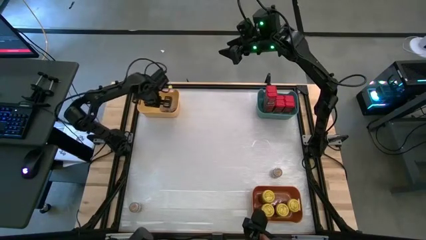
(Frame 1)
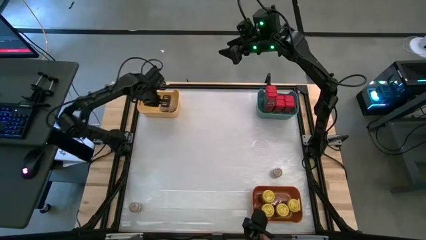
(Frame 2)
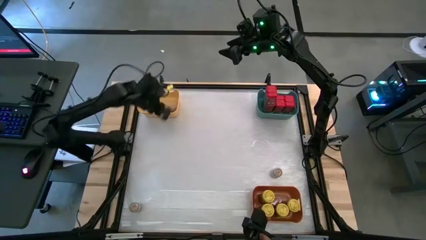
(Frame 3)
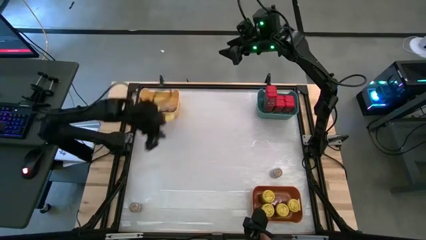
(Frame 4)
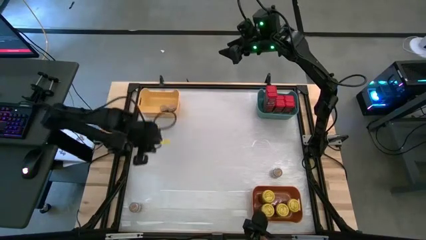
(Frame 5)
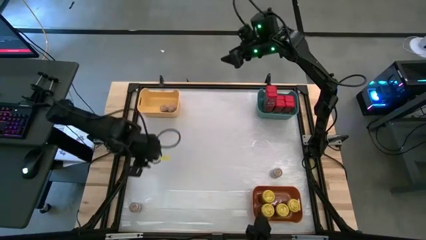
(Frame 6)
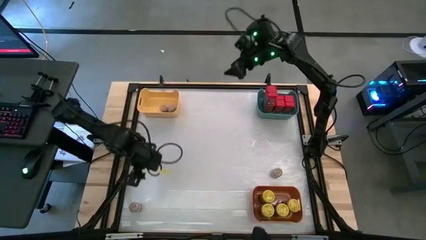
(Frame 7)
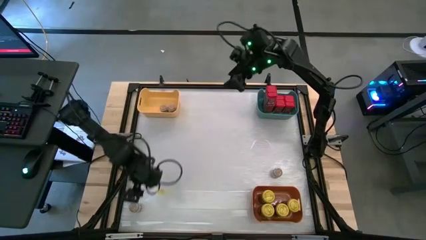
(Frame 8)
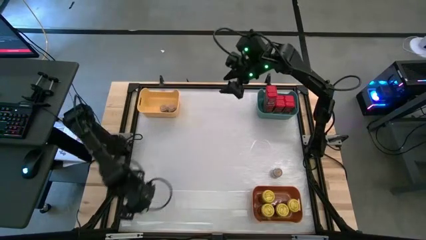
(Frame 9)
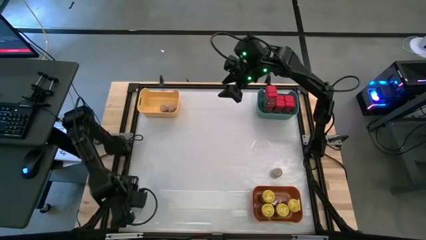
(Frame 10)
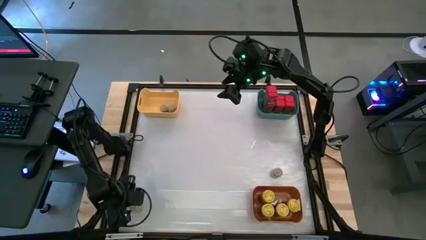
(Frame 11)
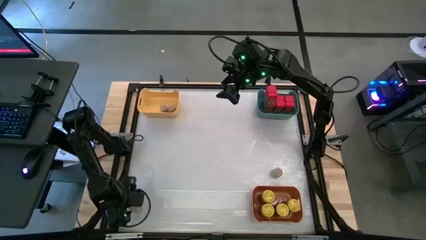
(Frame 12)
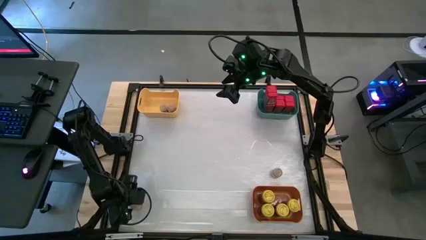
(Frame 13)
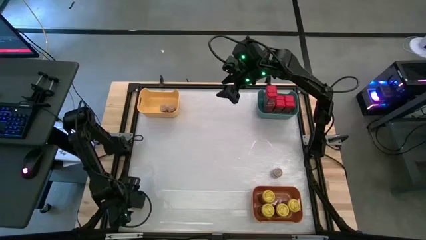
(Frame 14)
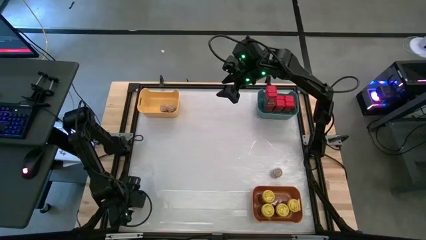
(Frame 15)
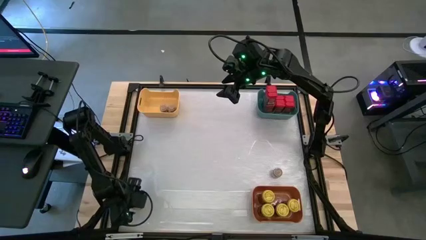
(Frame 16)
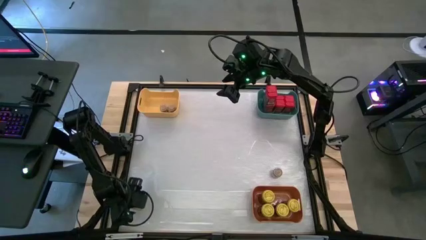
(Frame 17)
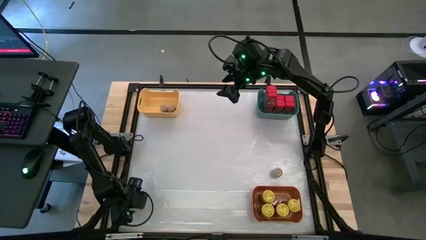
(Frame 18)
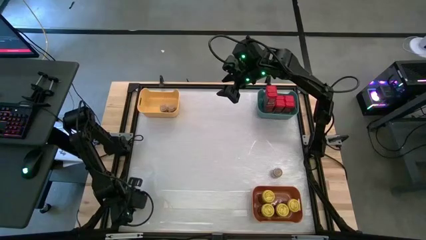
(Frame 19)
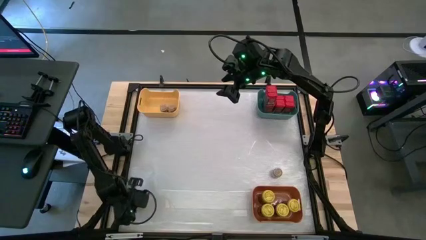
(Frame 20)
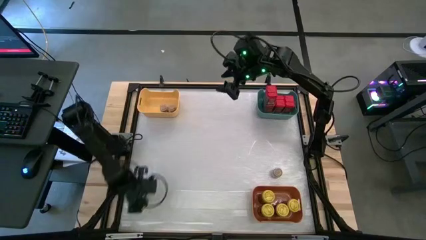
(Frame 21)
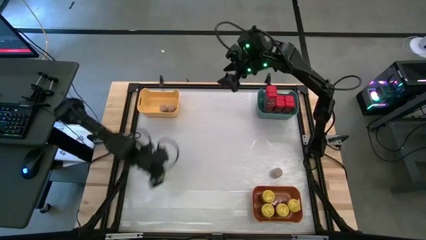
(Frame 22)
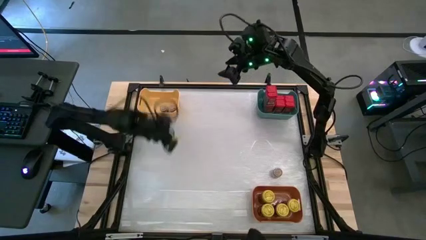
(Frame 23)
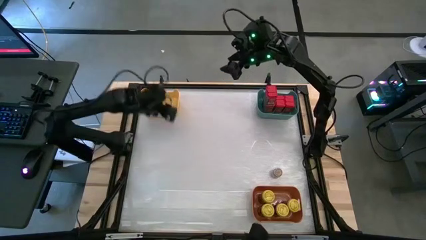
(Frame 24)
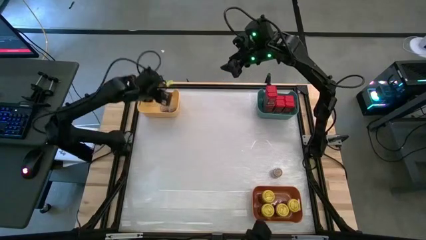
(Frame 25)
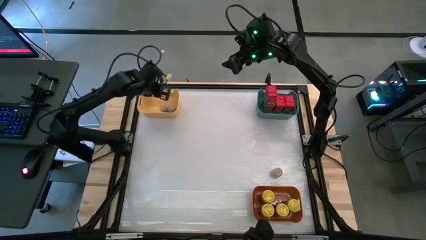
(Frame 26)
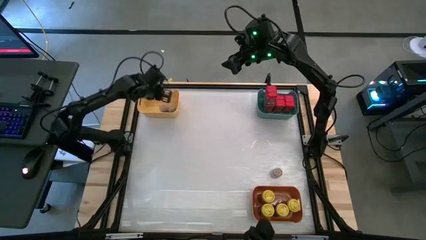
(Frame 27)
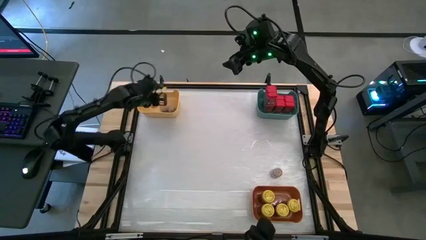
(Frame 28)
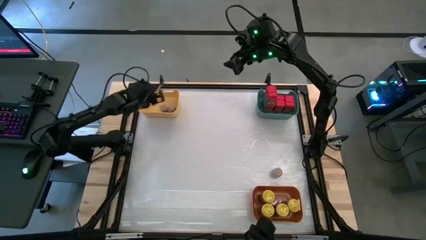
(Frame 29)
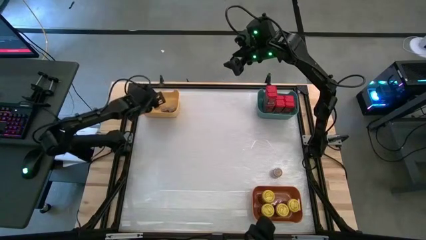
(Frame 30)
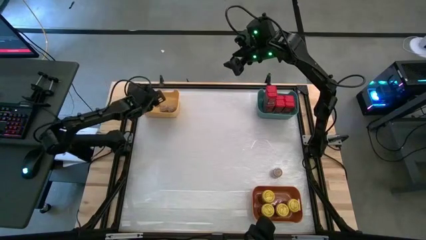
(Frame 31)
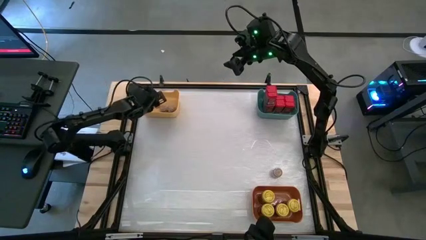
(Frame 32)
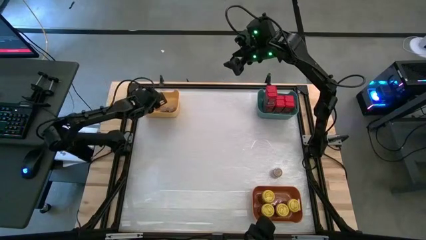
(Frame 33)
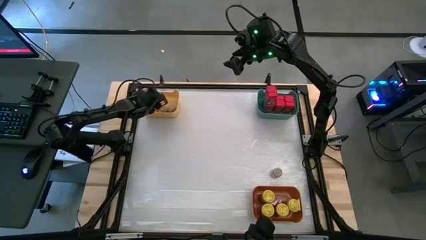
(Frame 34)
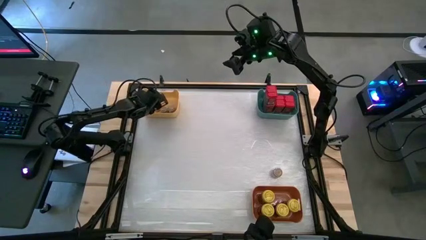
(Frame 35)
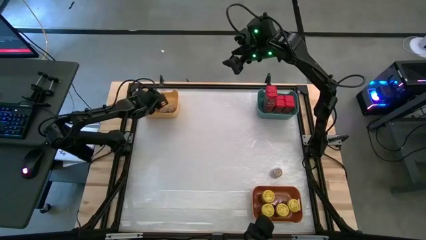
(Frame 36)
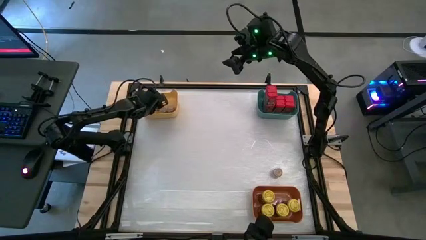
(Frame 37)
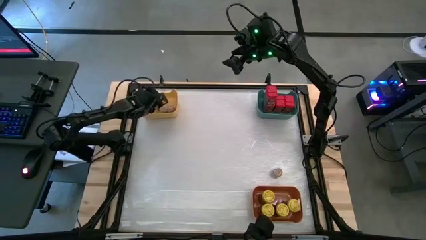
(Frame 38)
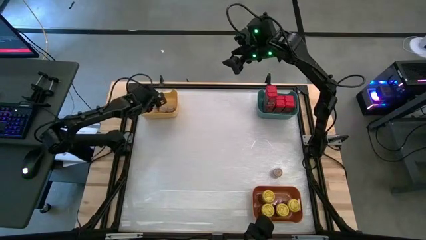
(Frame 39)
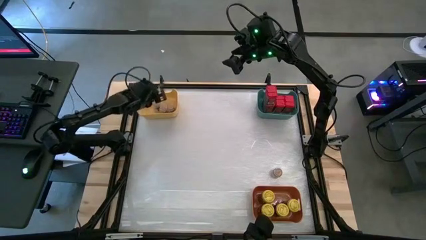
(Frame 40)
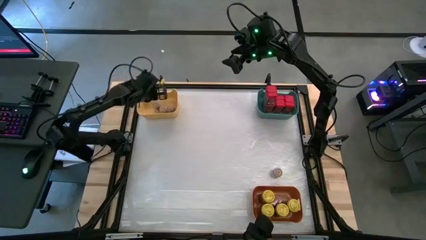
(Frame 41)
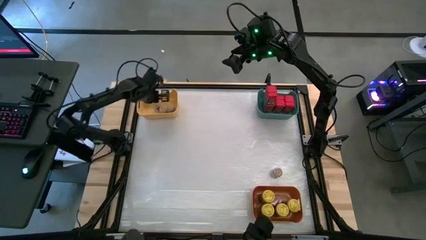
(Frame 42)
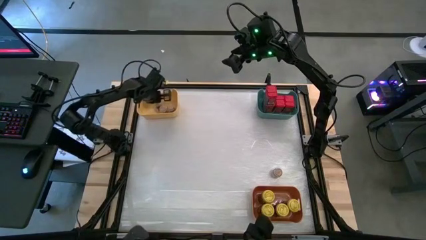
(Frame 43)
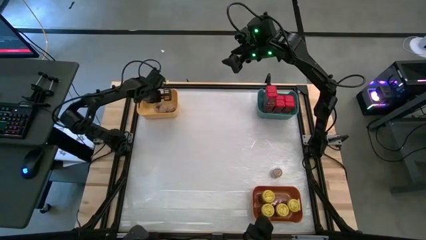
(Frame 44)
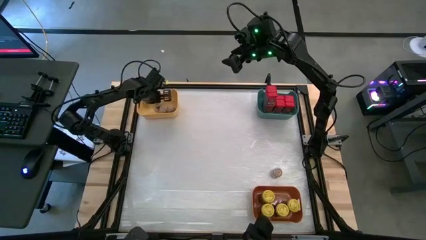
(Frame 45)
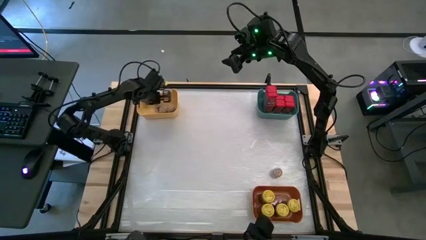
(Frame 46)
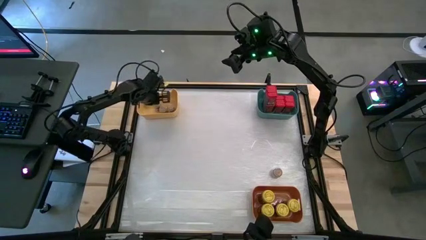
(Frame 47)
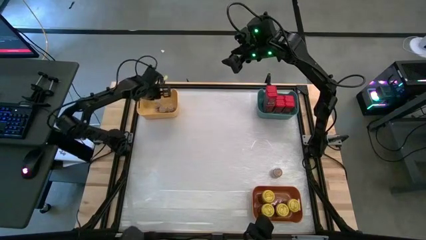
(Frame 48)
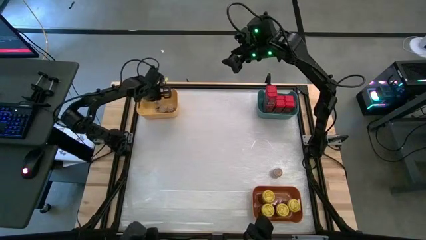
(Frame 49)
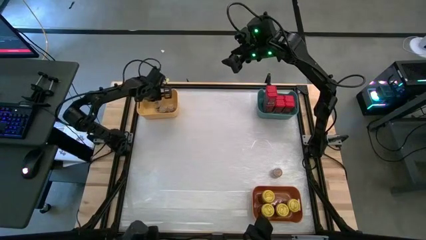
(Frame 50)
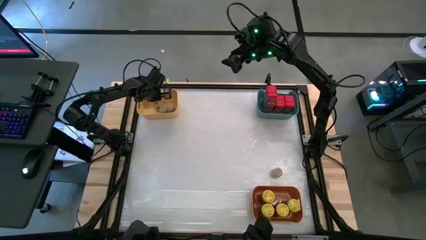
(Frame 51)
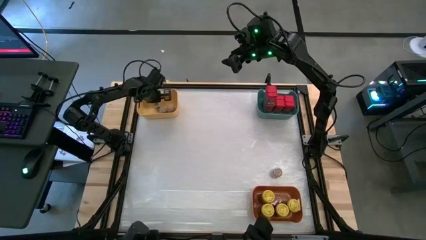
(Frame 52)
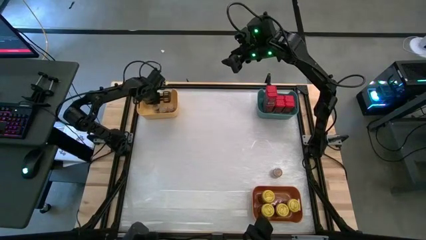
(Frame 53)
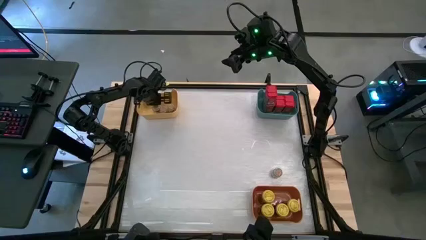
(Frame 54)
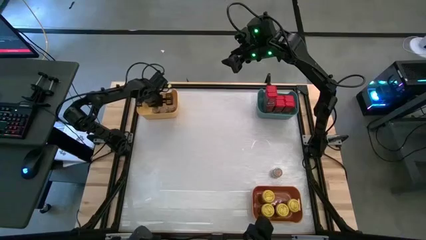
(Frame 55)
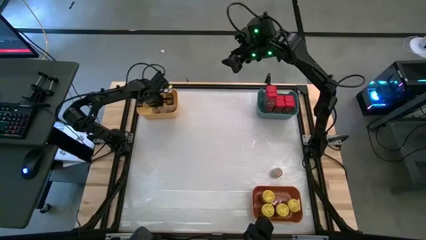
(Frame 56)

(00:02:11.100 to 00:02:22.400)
Task: Sort spices by type
Put the bottom brown seasoning bottle into the yellow bin

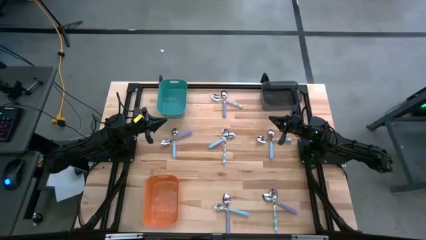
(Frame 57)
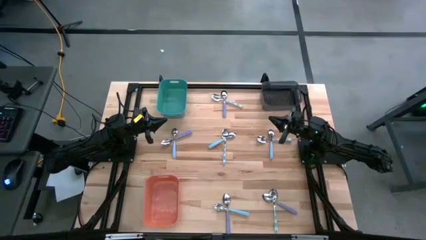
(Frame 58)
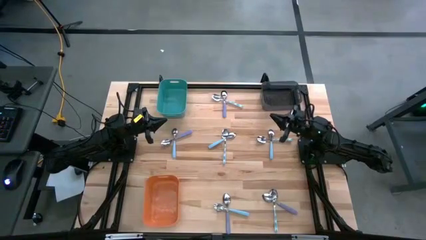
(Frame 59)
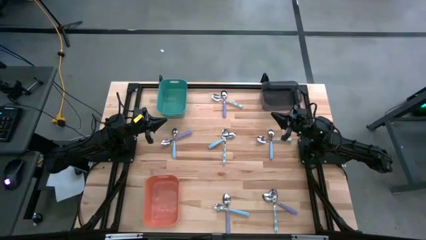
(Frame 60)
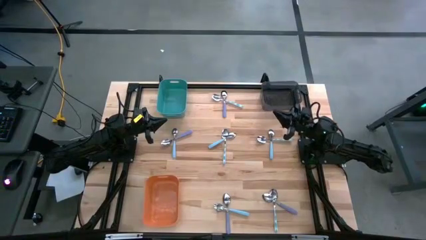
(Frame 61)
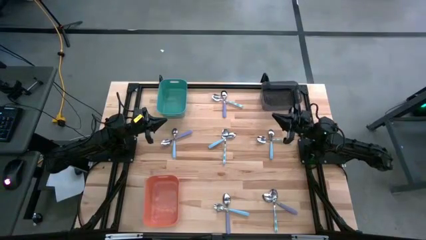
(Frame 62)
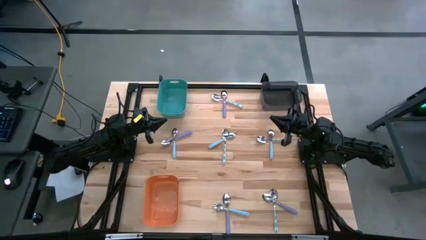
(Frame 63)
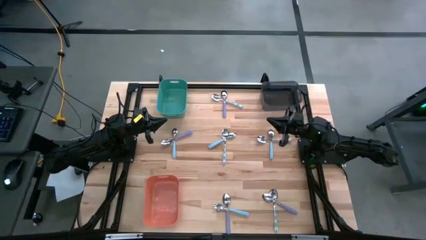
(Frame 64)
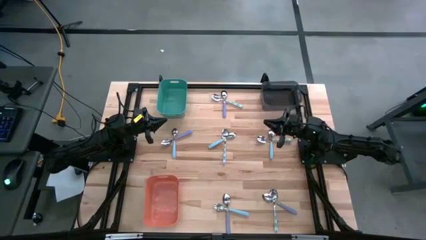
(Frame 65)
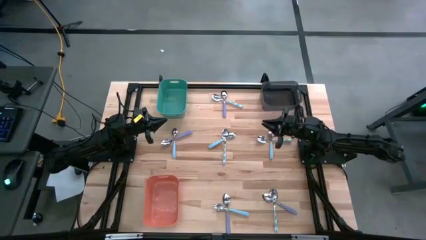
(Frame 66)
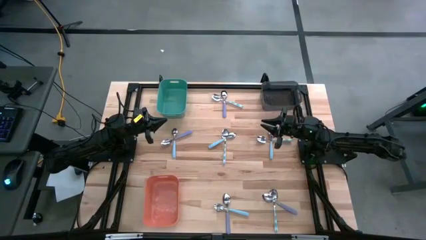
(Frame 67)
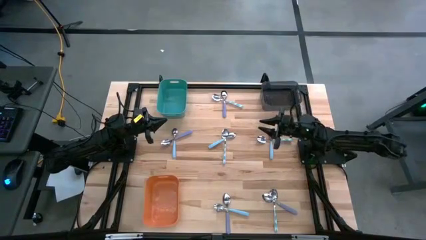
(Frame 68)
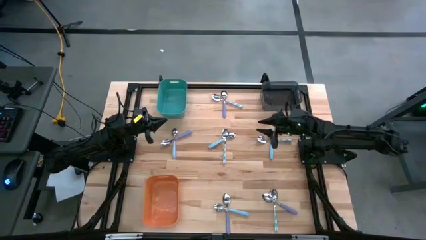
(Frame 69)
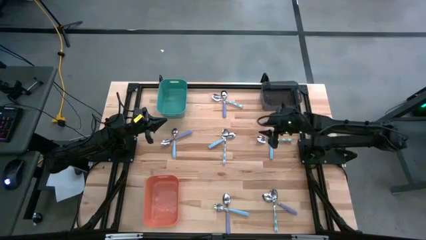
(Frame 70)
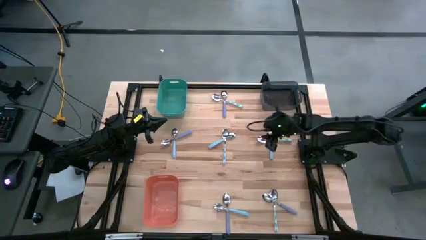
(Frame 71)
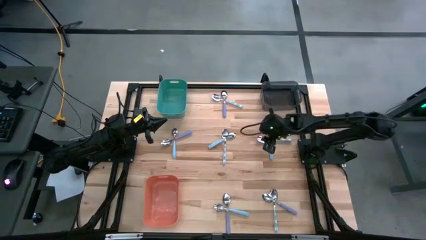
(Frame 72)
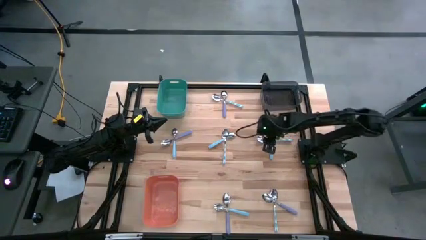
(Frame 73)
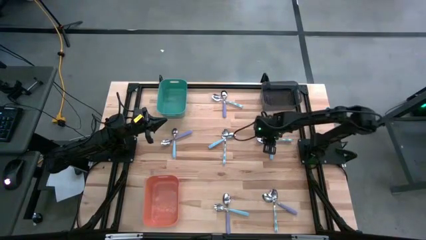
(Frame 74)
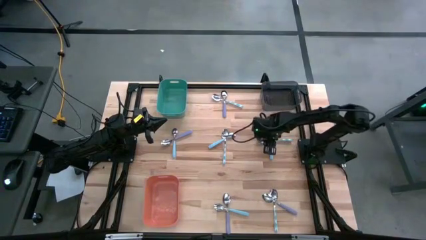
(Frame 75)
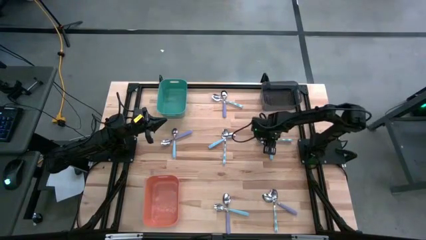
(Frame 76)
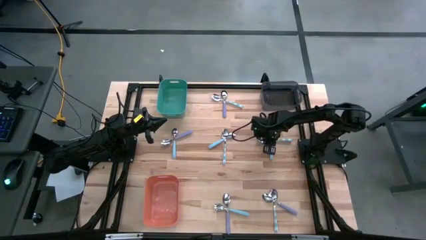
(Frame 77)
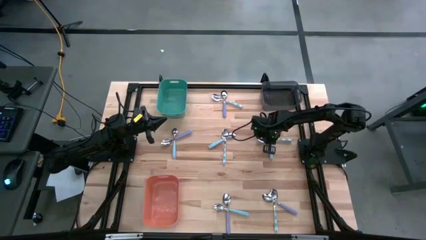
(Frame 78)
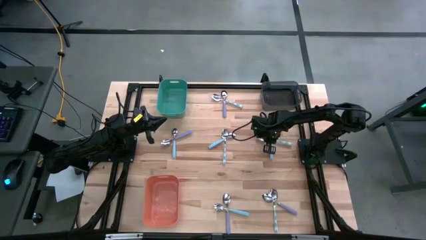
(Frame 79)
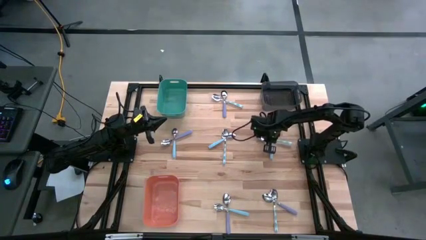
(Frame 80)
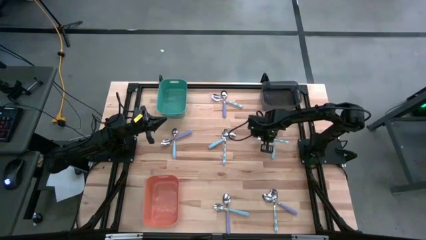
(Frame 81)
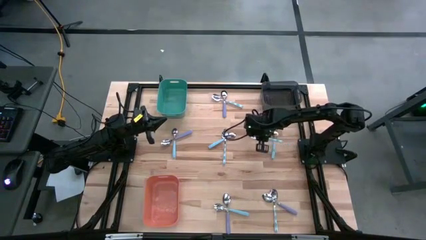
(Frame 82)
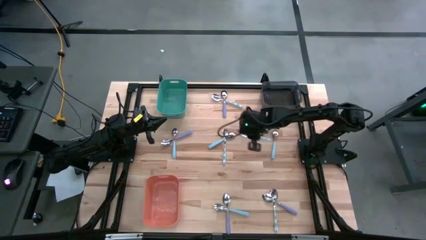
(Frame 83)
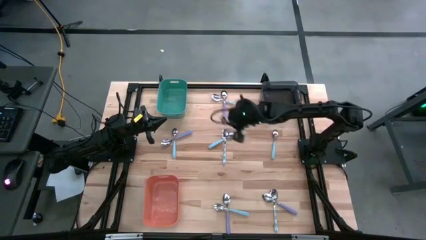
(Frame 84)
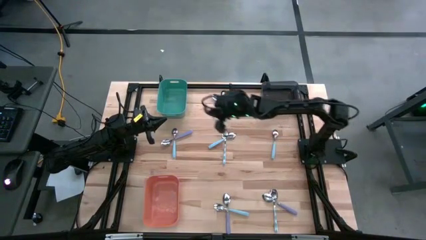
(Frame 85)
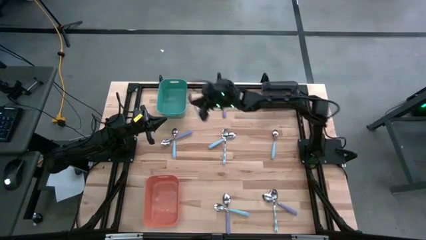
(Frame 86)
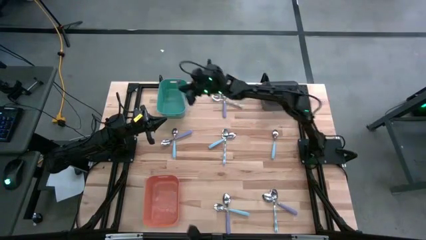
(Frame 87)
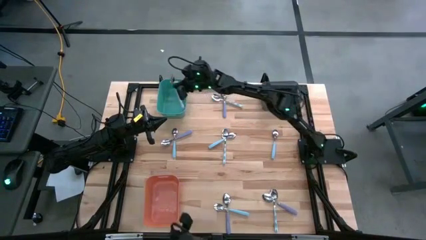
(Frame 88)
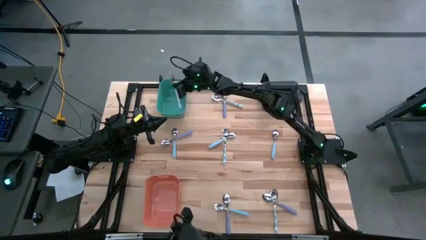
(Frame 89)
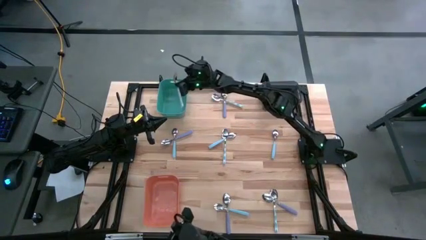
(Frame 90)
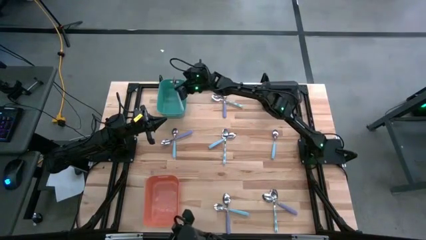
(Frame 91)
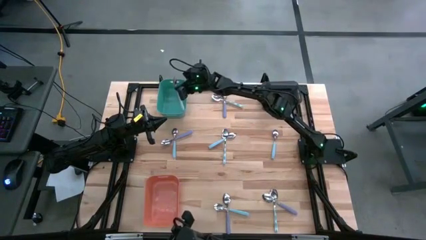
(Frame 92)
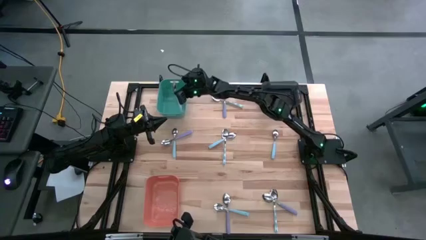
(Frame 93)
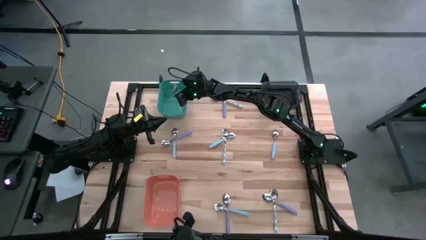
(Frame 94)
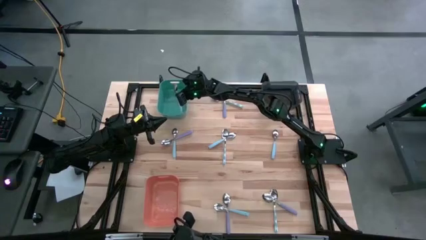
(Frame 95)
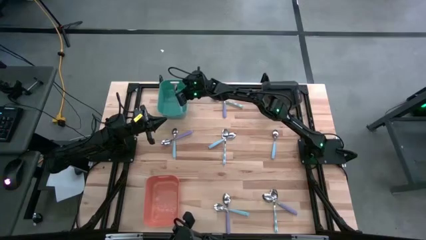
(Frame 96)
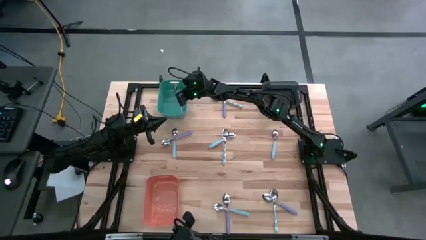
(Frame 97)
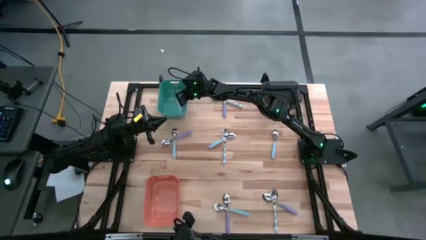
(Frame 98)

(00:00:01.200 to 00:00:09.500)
Task: Sort silverware by color (type)
Put the blue spoon into the green bin
